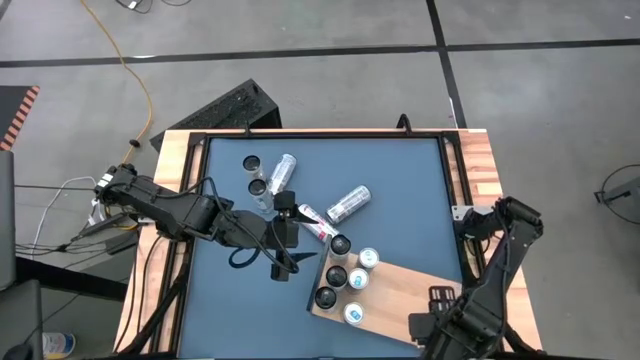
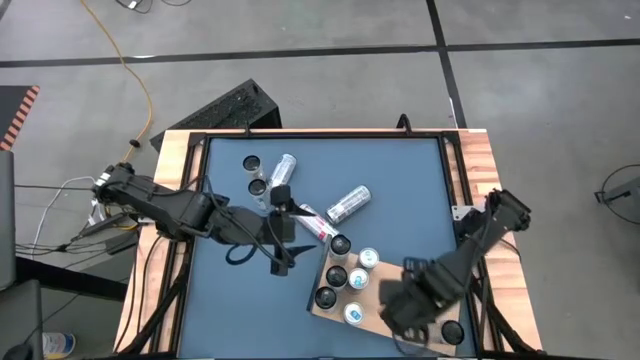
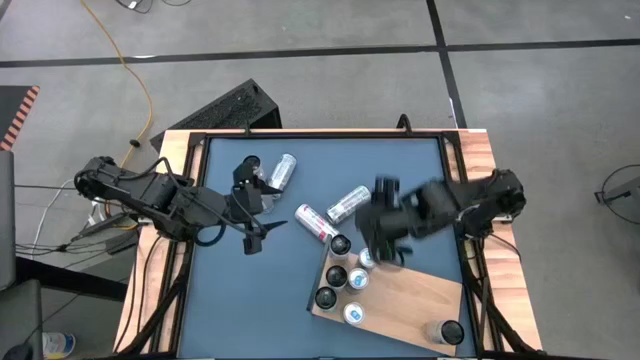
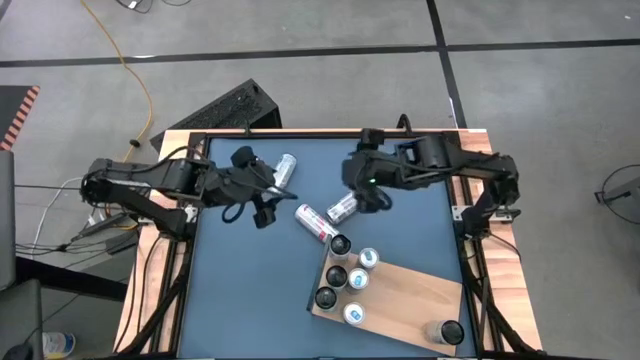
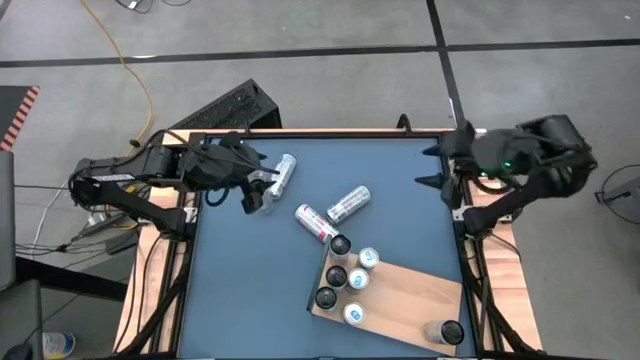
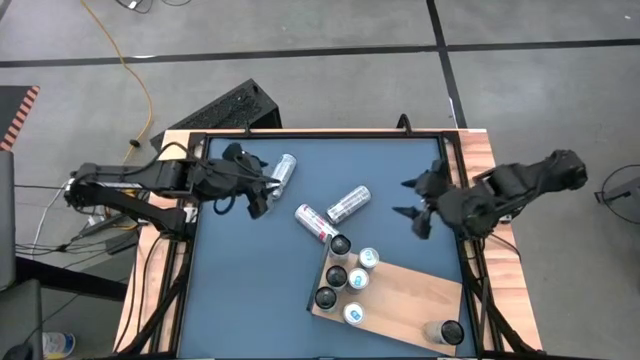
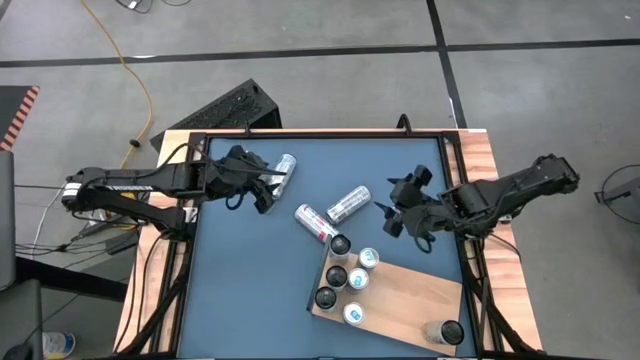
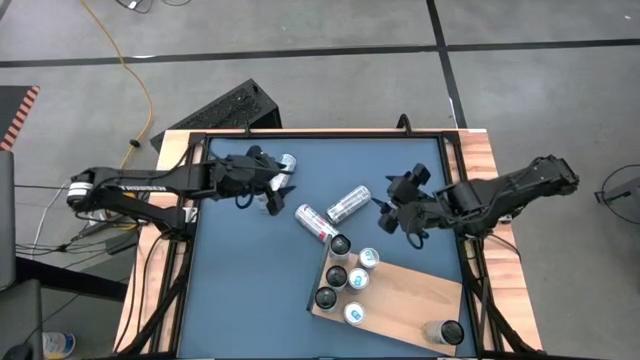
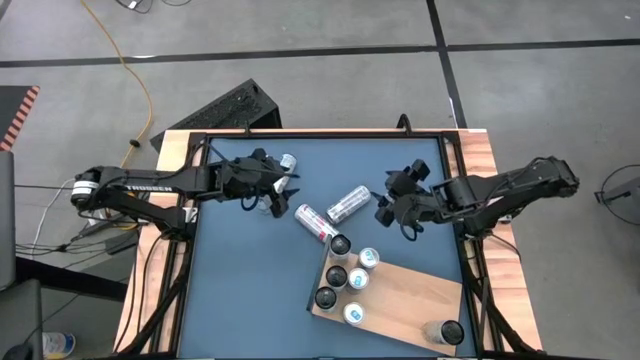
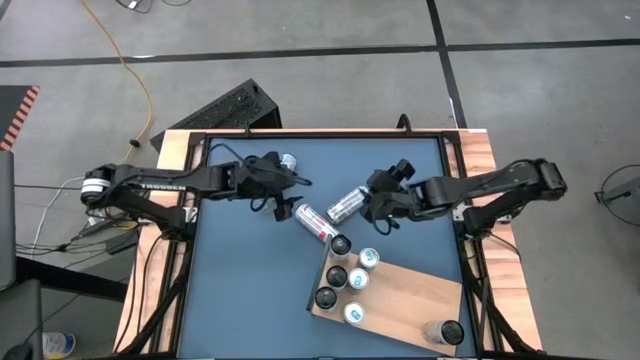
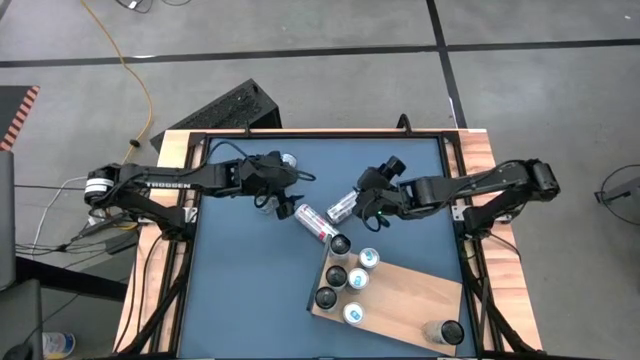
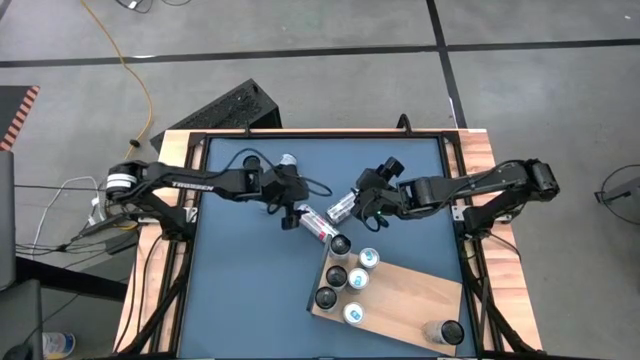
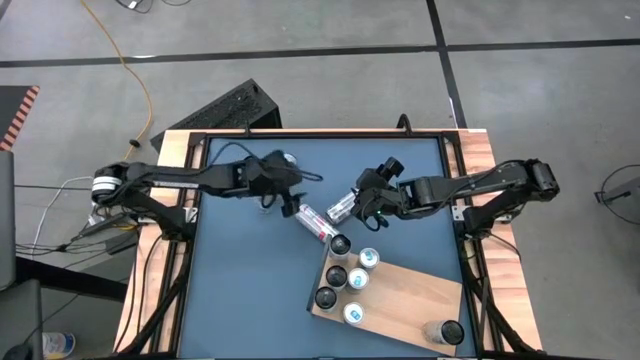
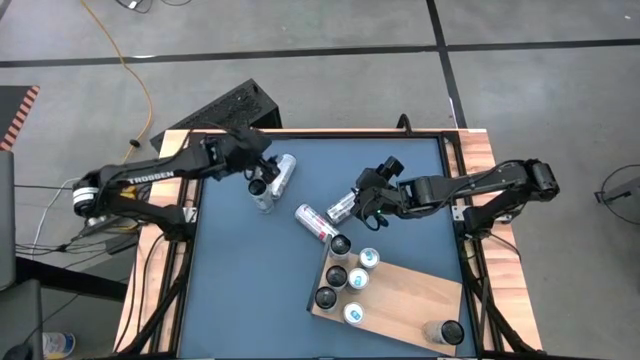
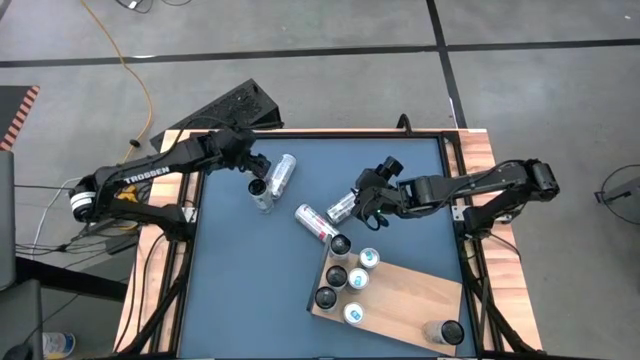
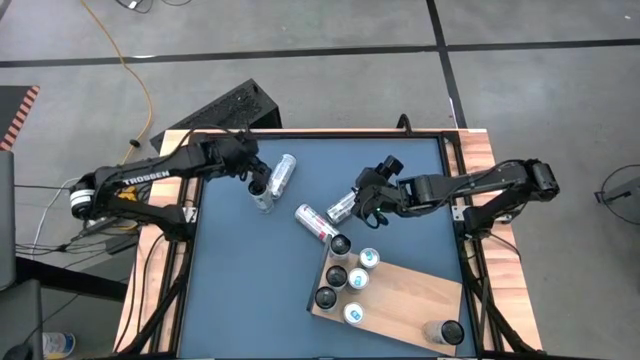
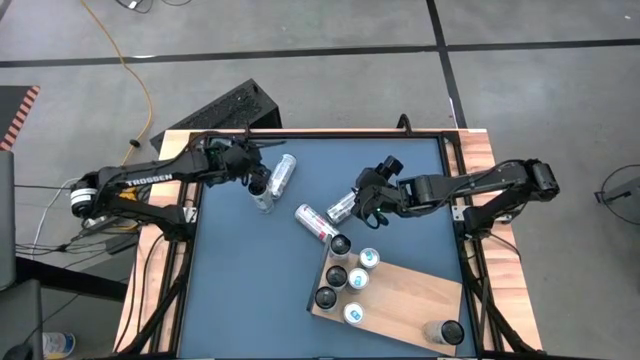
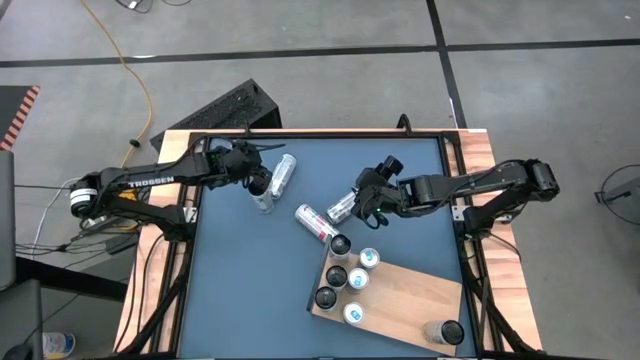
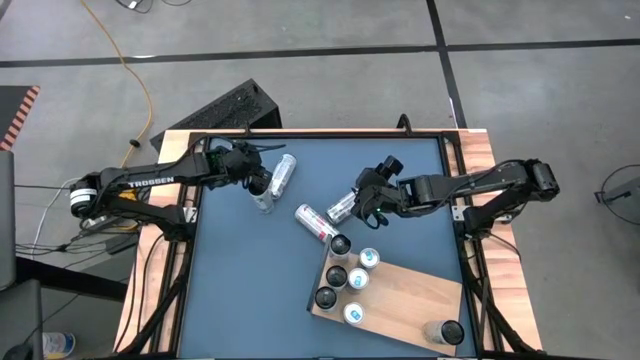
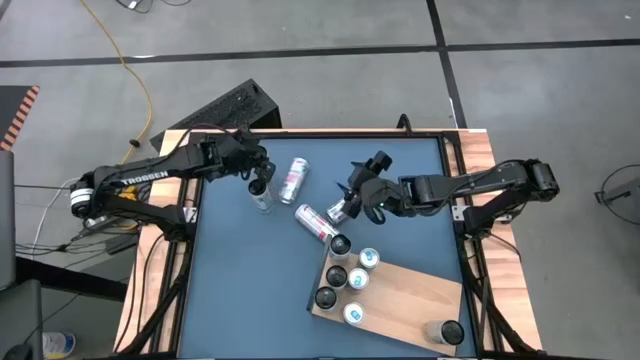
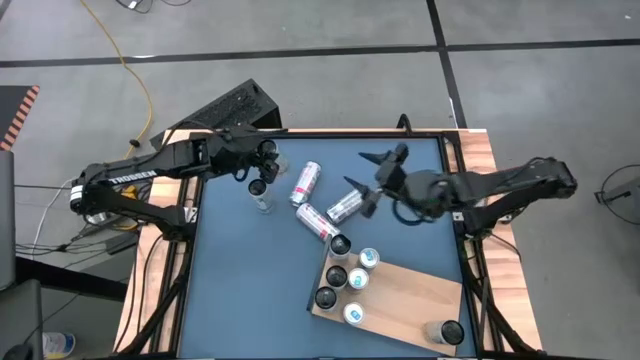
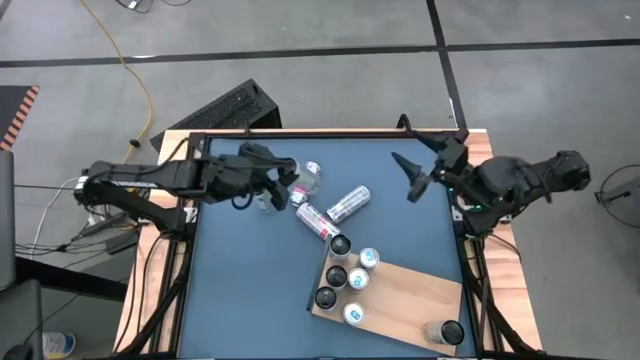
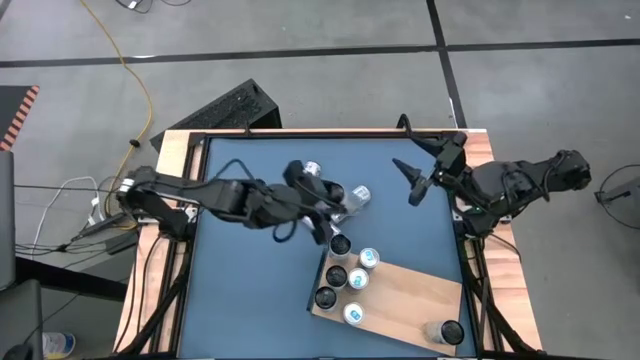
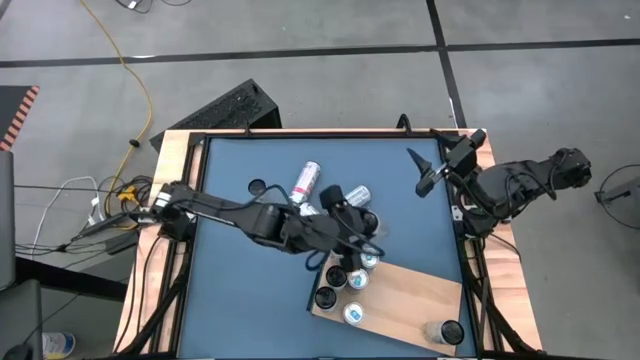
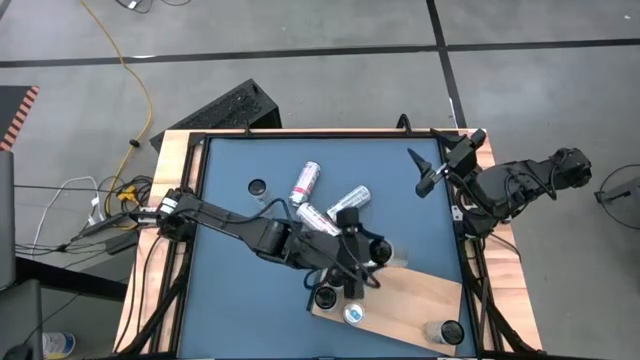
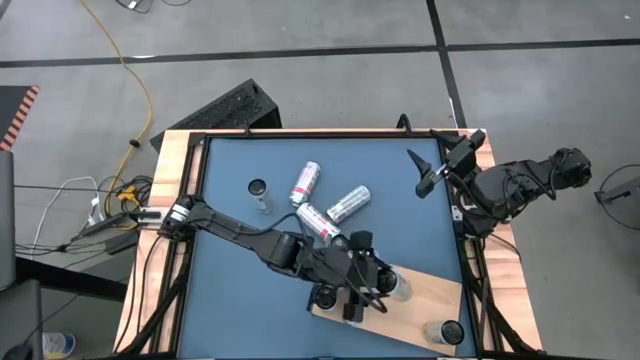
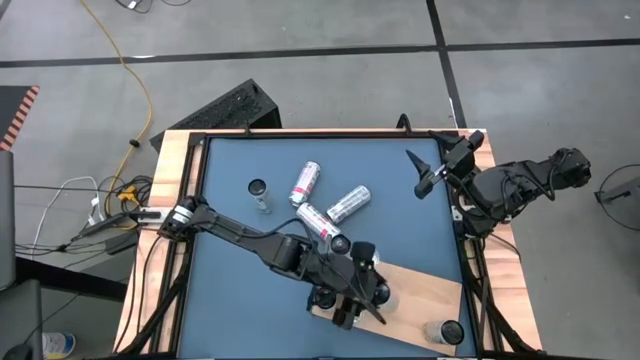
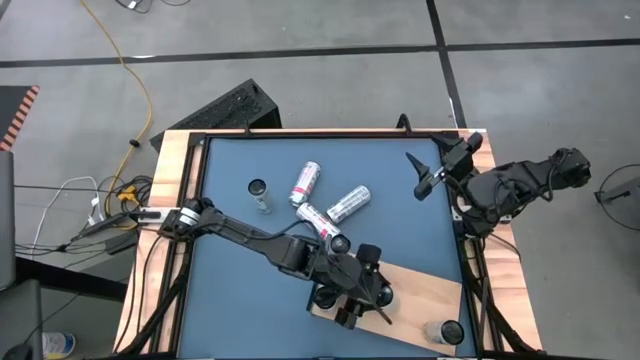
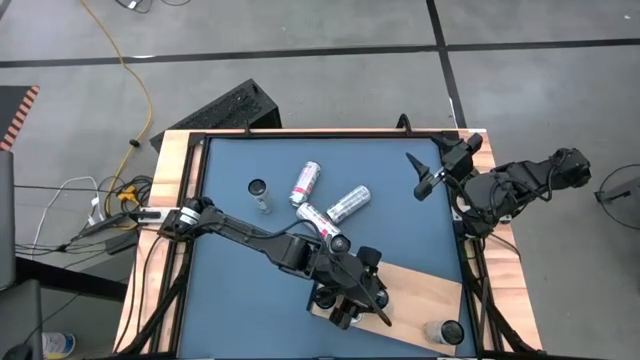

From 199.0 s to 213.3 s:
Task: Place canned beverage on shelf
Put the left white yellow soda can on the shelf

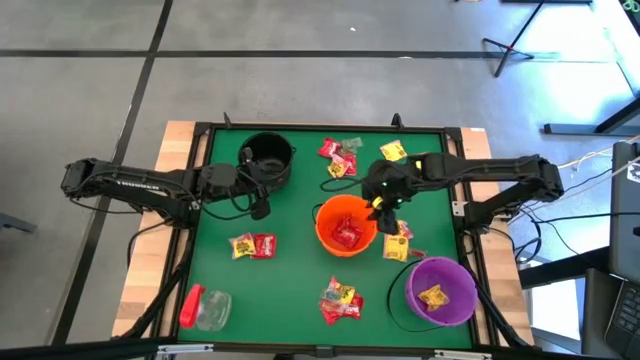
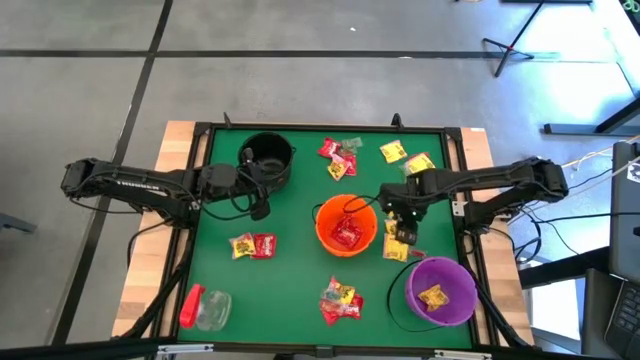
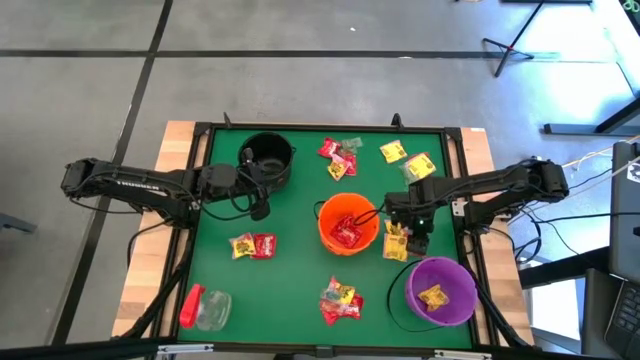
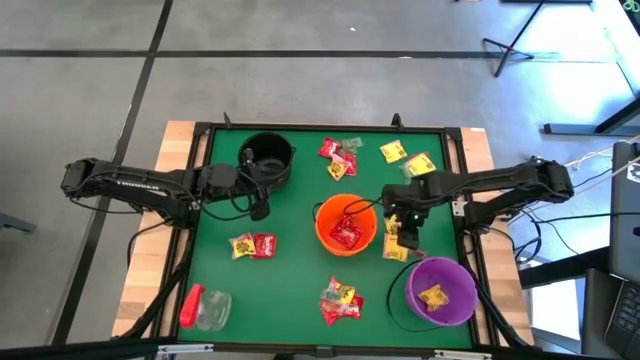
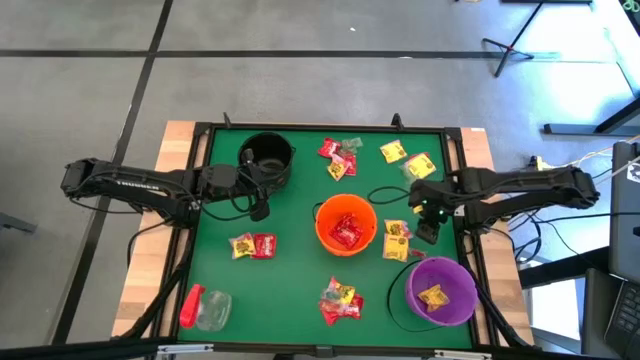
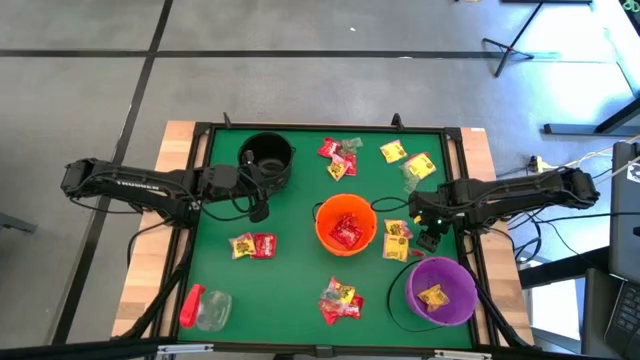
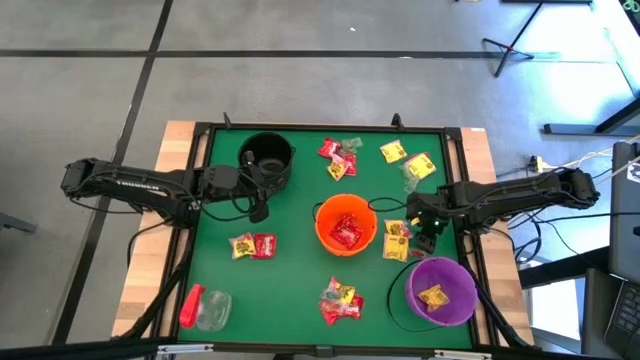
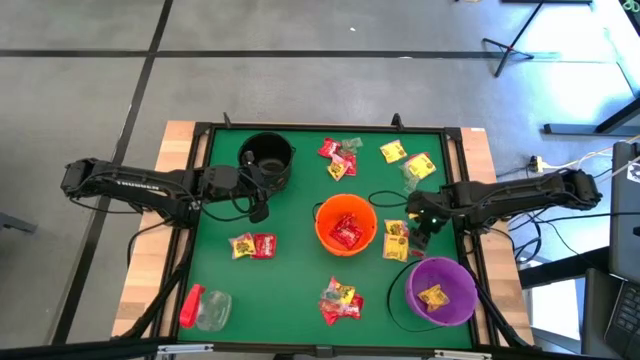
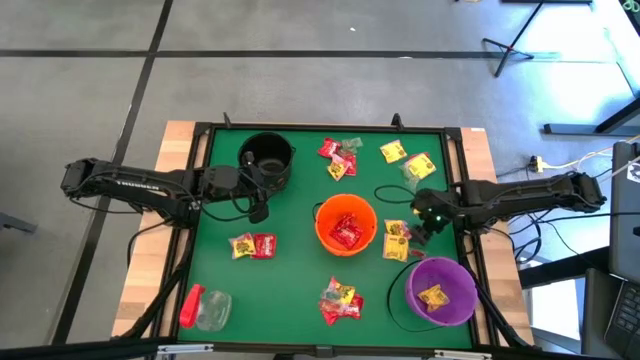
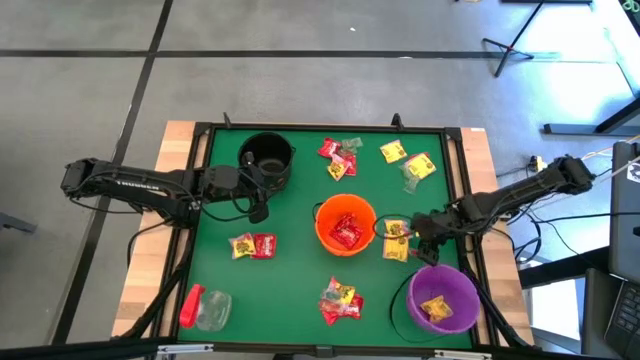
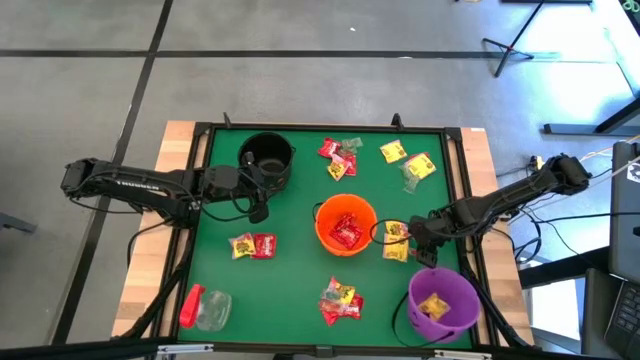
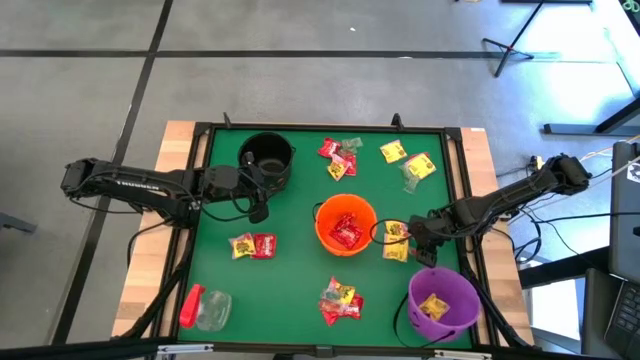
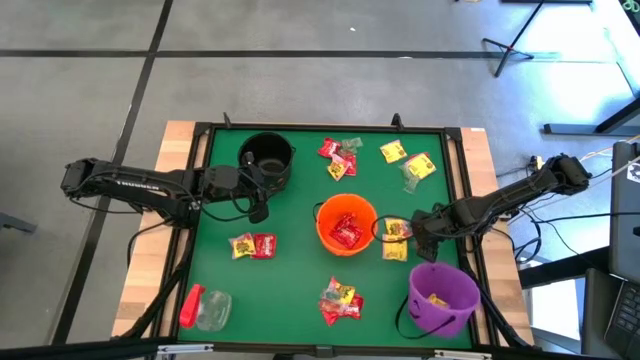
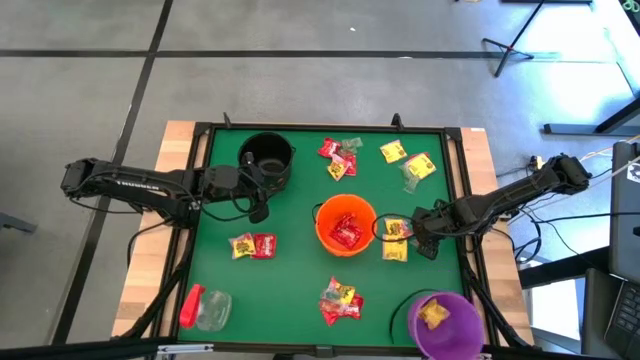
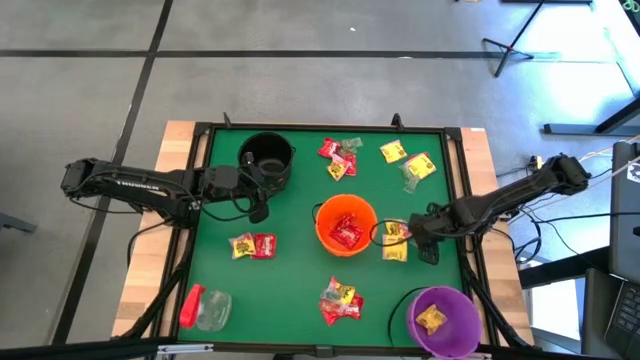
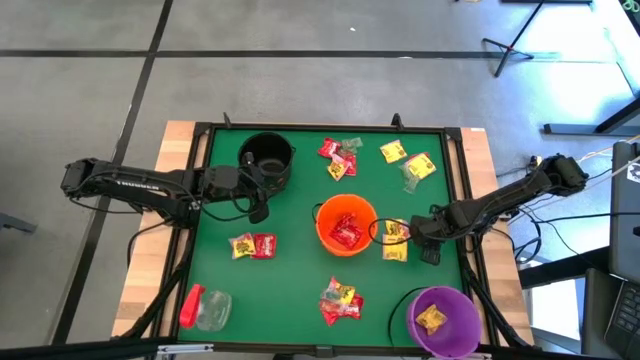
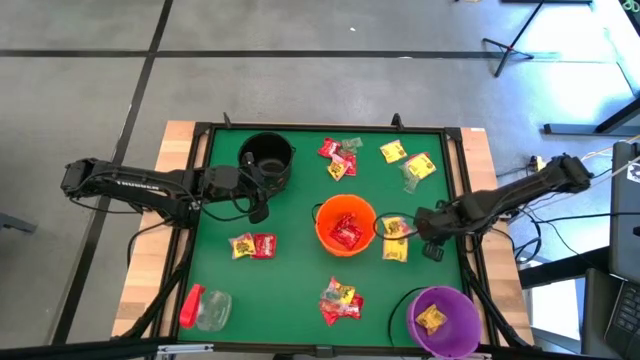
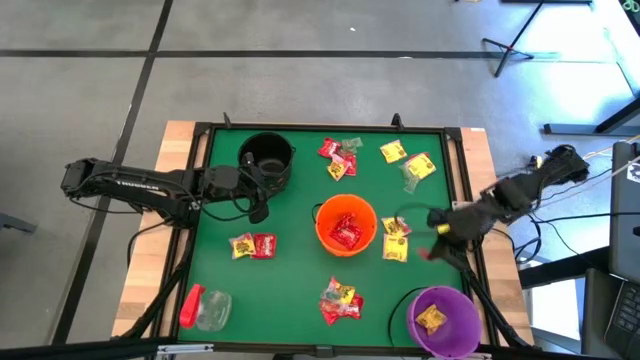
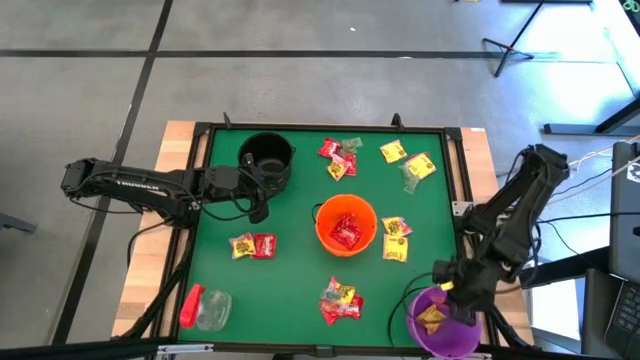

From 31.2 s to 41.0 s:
Task: Sort candy
Put the orange candy into the purple bin
